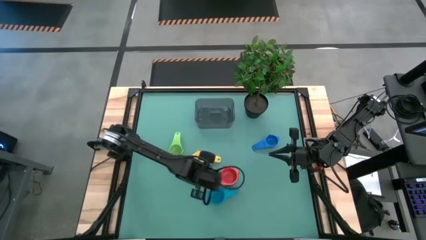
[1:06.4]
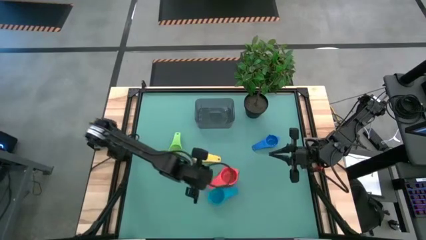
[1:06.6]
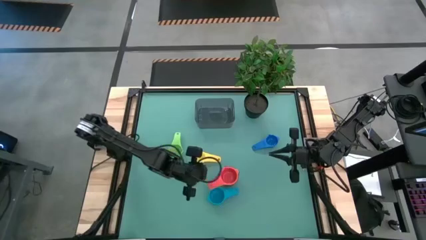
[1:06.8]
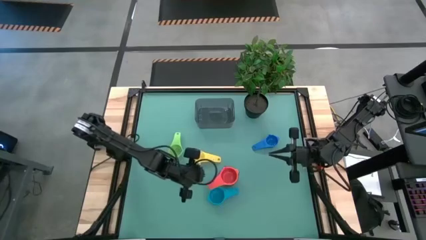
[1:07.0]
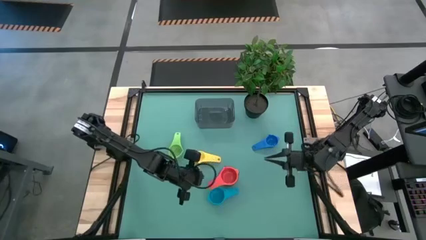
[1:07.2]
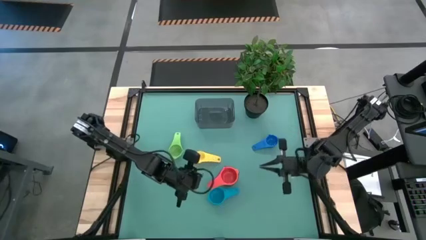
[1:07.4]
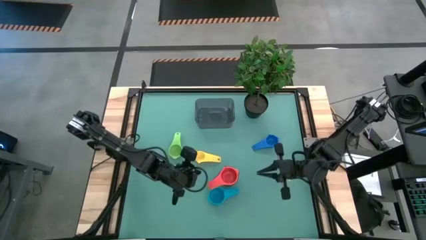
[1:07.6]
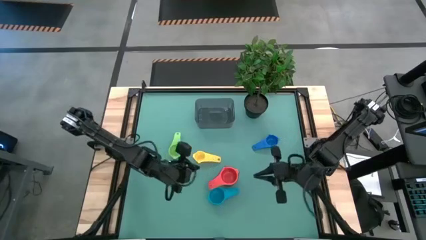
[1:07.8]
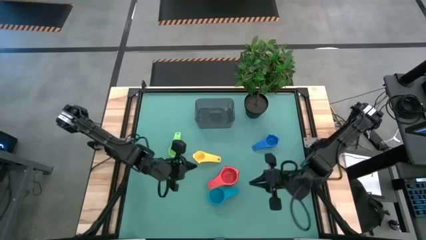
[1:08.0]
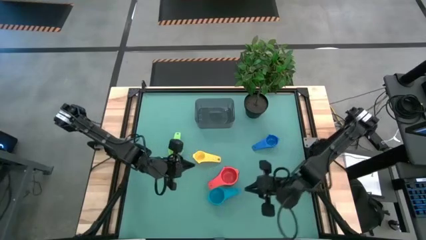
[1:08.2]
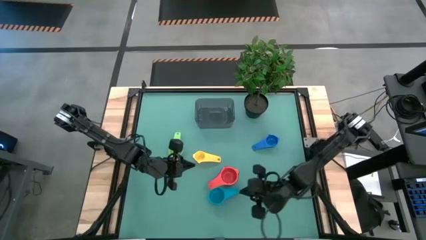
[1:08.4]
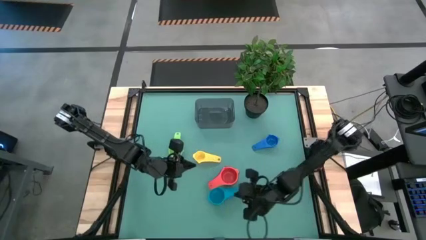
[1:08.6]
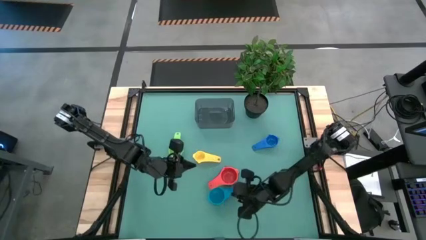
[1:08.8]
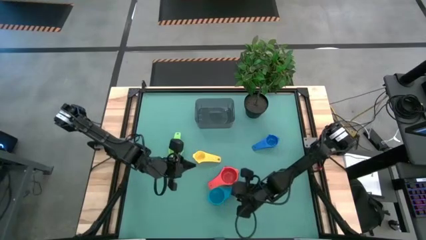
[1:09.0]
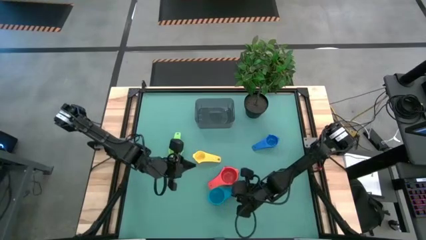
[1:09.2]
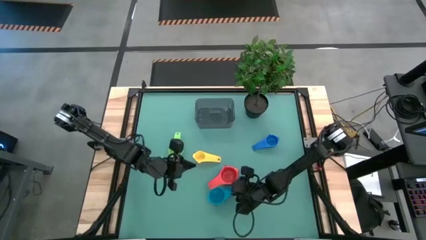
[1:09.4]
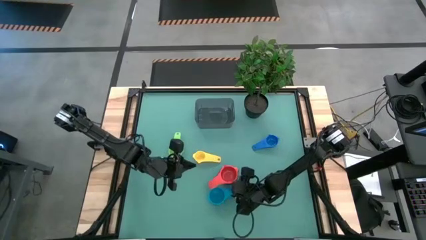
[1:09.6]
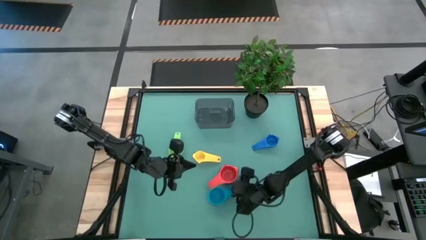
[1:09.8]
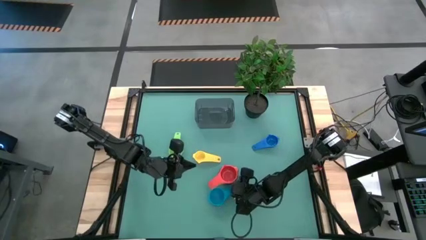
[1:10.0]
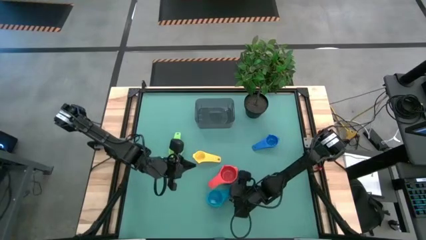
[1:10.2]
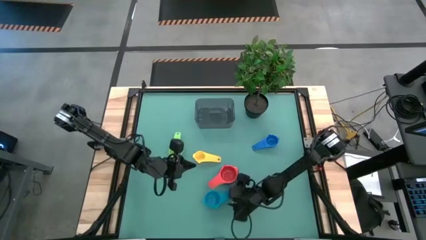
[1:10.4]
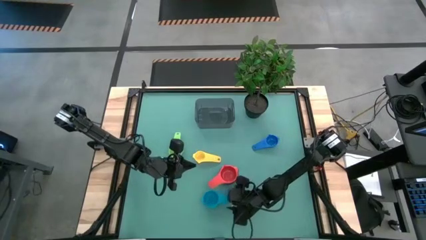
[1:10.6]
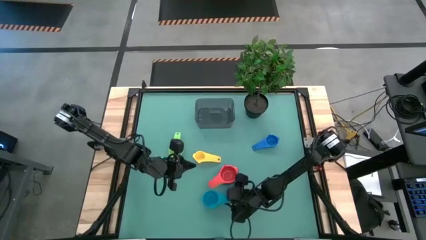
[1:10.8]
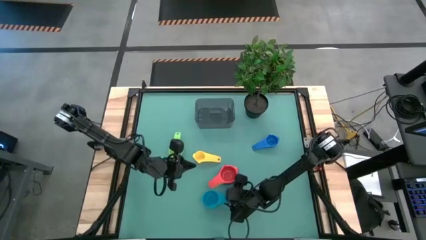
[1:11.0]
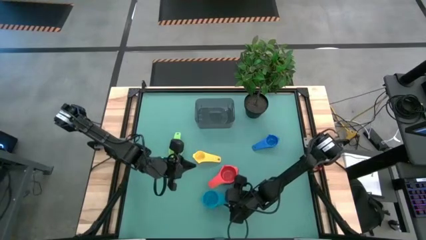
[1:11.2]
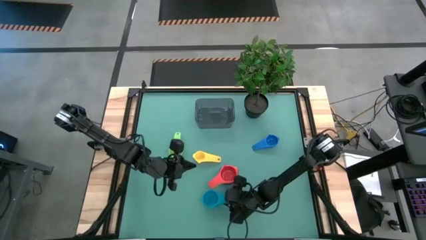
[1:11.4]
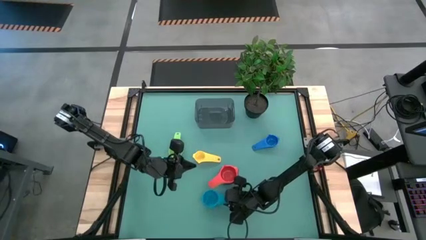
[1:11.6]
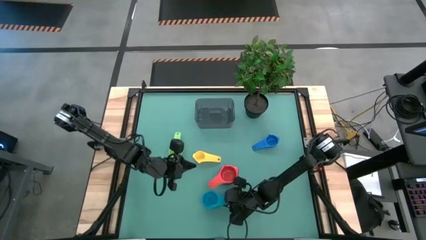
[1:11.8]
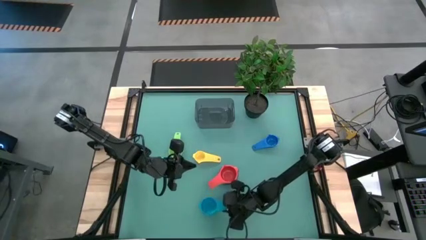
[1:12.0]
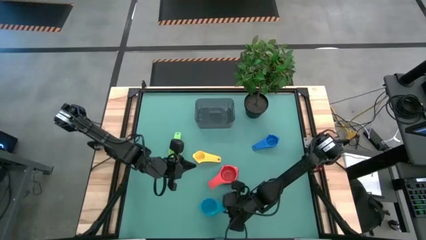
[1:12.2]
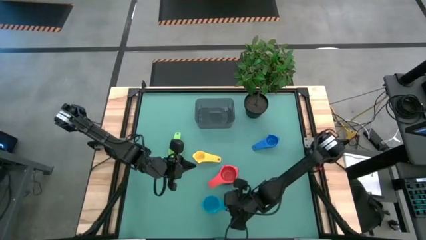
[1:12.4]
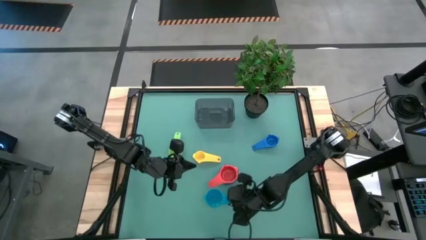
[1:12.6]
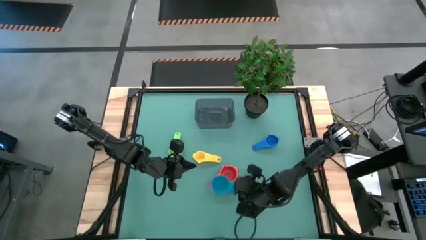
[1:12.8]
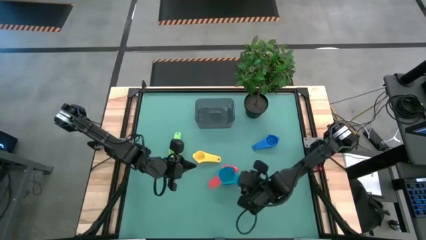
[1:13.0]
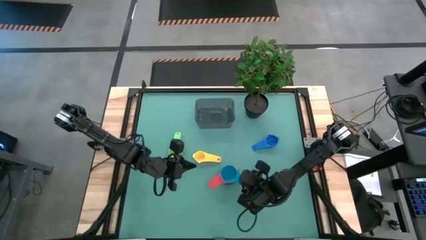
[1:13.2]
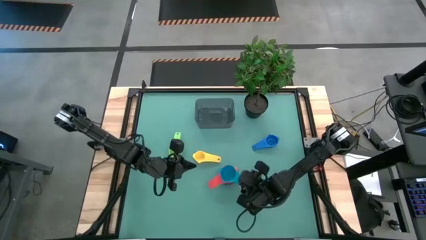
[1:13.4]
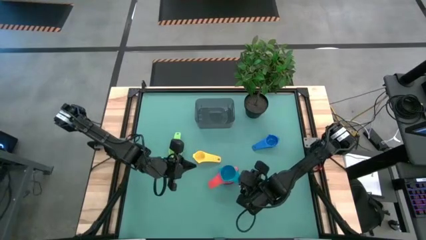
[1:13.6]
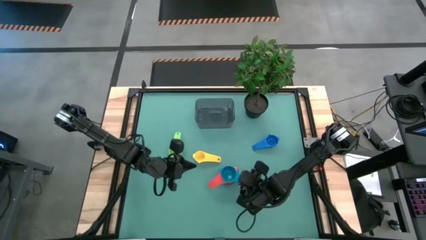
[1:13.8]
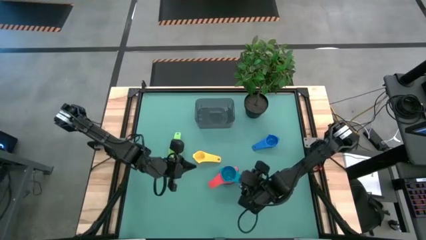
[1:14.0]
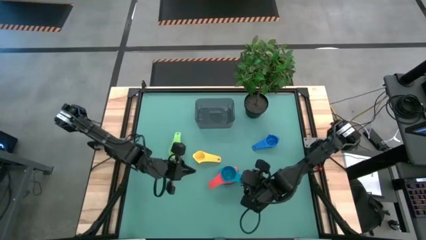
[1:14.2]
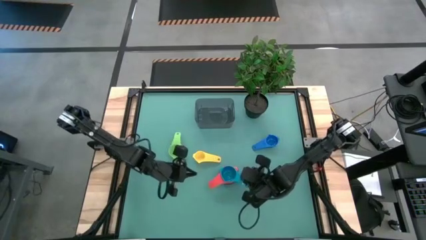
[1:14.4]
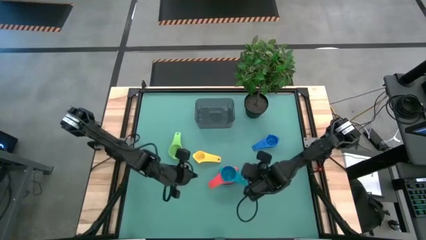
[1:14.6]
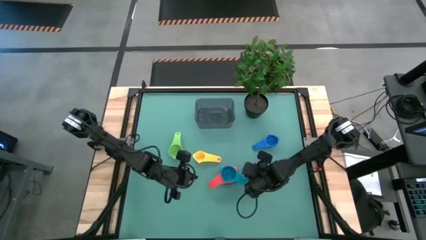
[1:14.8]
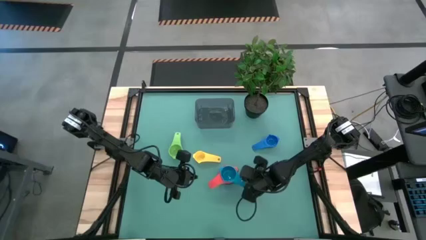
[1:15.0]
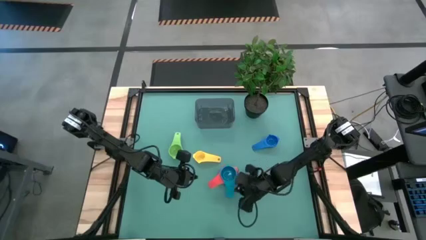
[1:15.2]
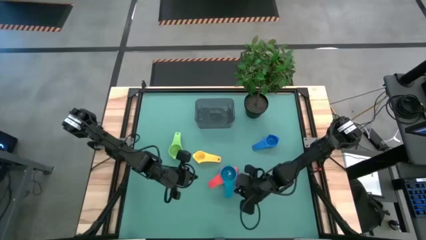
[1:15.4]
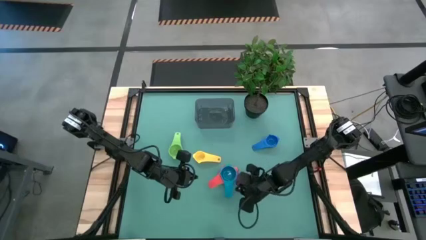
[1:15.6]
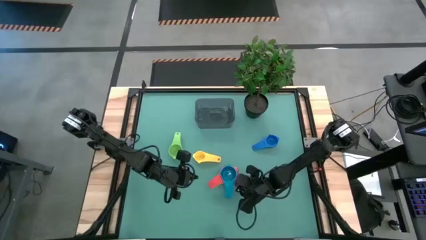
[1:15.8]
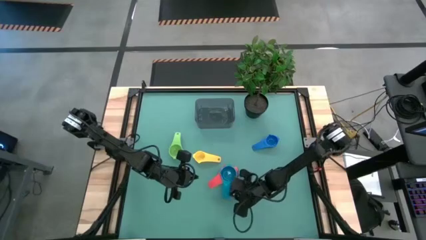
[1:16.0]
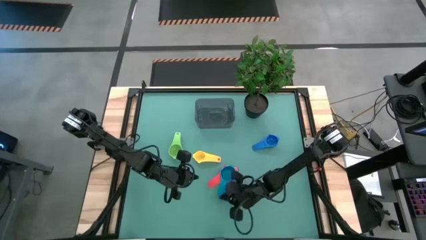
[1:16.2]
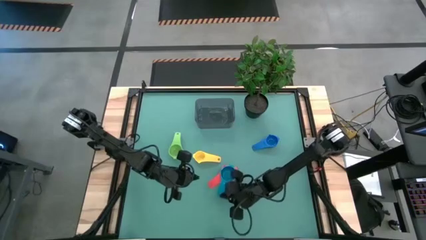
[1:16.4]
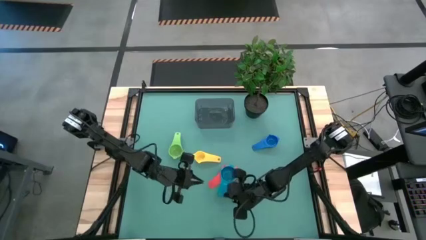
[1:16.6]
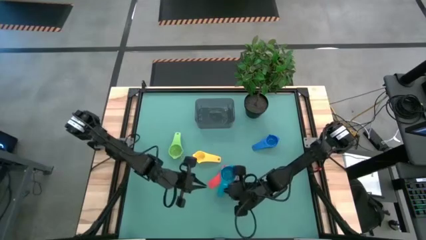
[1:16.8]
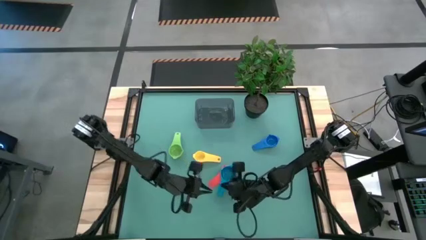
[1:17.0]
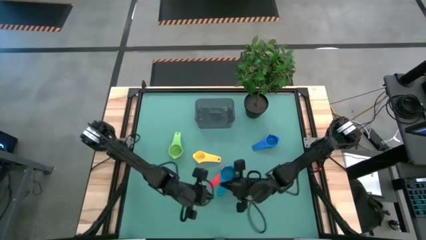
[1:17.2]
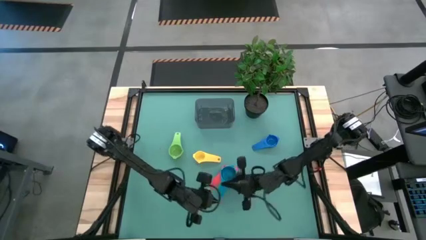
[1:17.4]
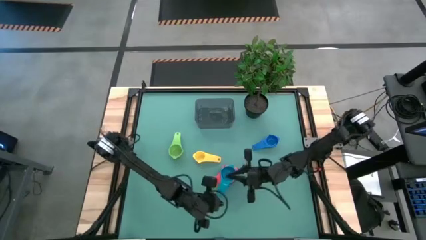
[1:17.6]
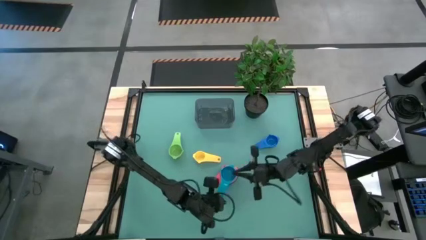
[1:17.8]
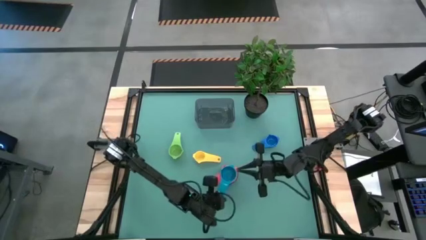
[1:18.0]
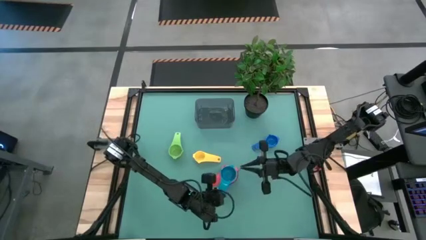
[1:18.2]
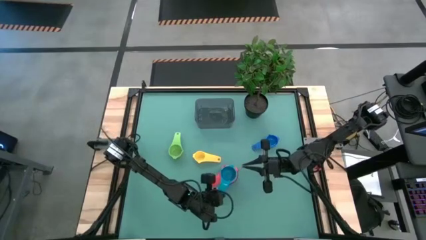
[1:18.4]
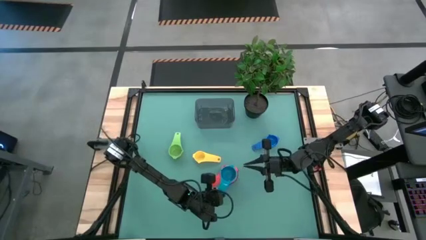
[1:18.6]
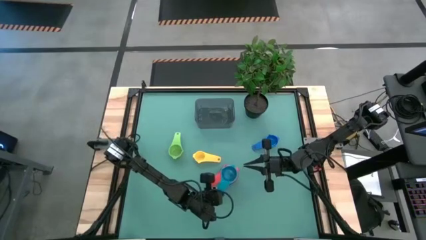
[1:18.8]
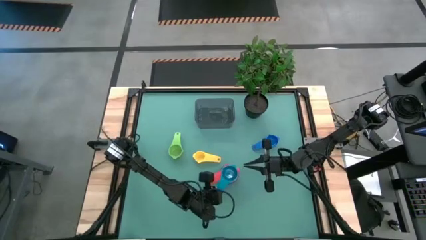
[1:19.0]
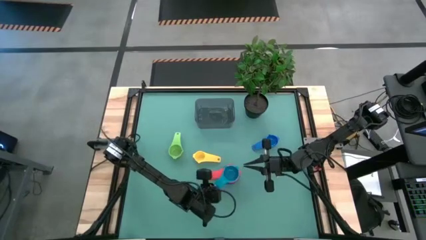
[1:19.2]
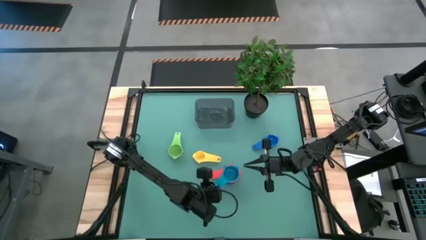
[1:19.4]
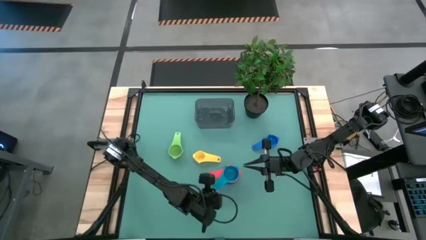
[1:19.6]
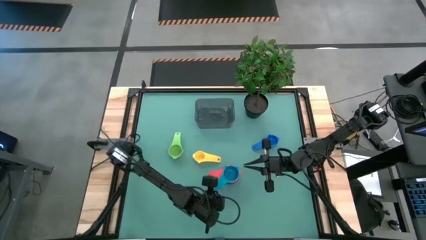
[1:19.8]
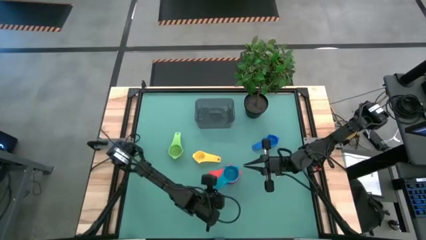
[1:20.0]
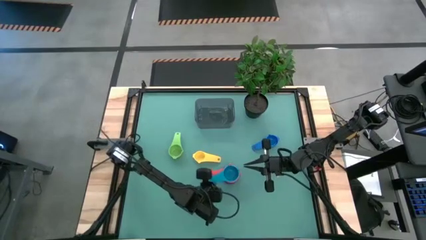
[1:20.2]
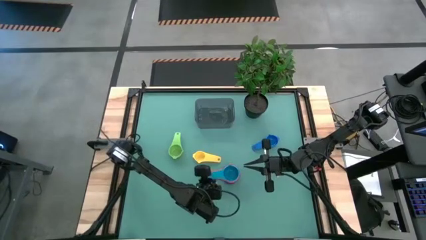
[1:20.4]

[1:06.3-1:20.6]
Task: Nest measuring cups in basket
Stack the light blue measuring cup into the red measuring cup

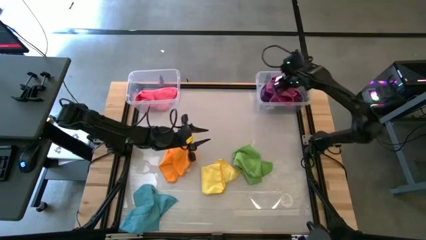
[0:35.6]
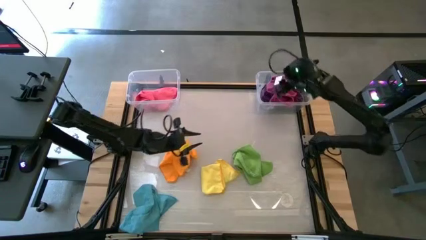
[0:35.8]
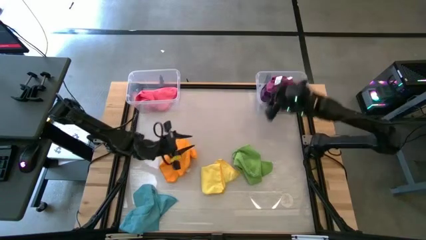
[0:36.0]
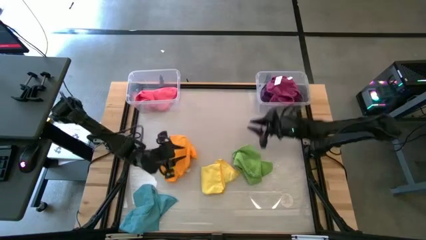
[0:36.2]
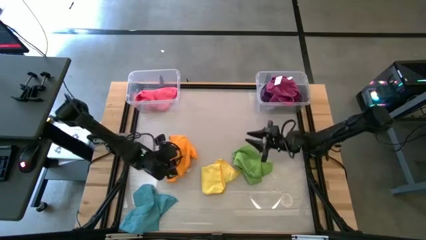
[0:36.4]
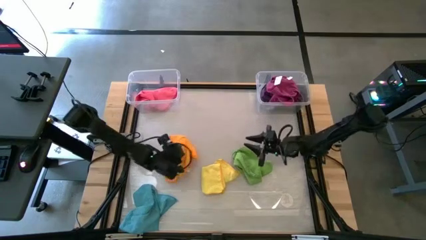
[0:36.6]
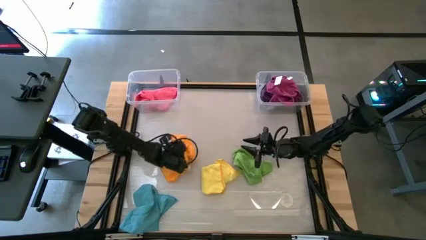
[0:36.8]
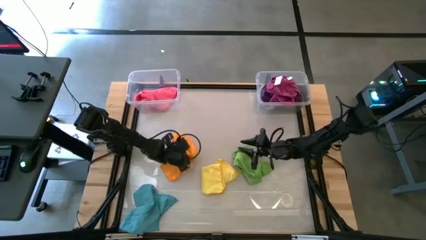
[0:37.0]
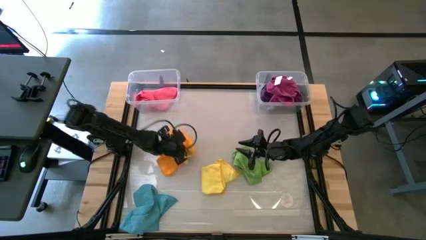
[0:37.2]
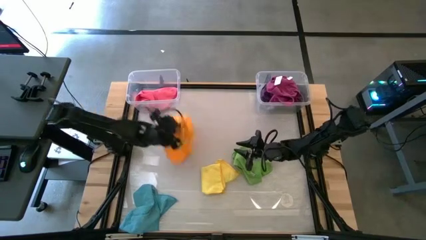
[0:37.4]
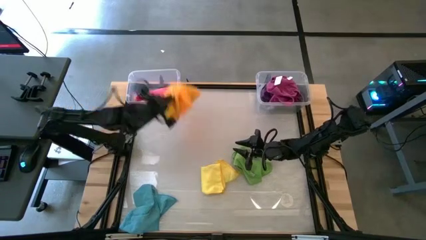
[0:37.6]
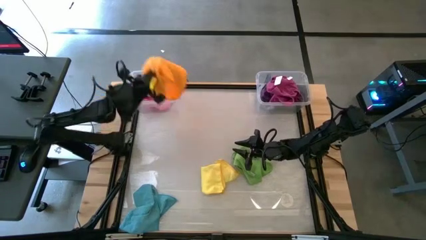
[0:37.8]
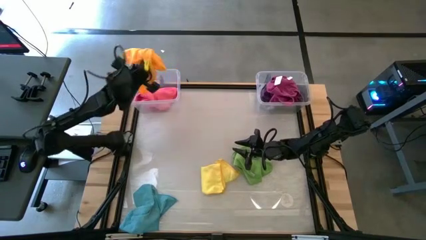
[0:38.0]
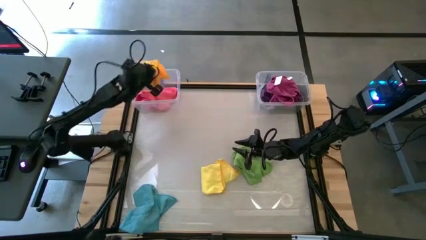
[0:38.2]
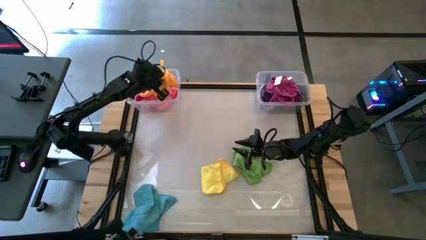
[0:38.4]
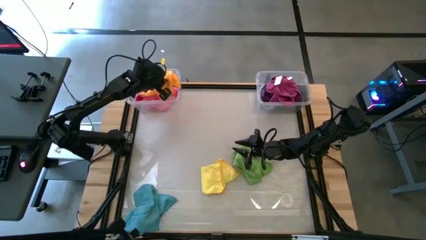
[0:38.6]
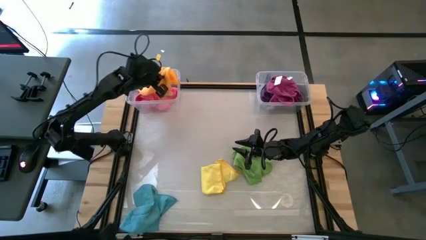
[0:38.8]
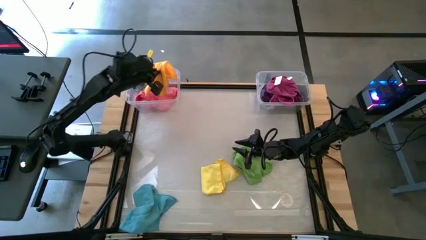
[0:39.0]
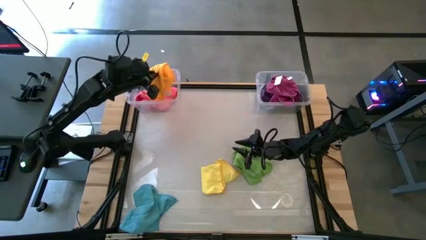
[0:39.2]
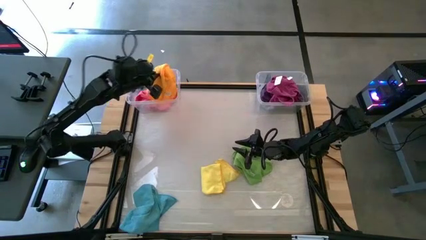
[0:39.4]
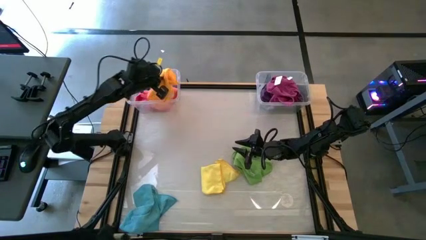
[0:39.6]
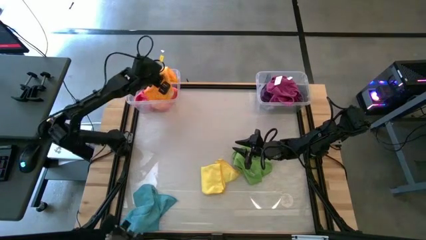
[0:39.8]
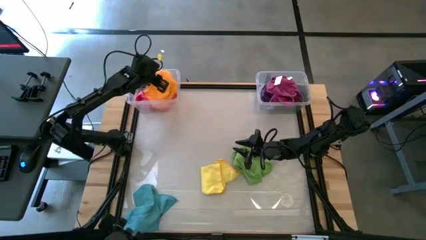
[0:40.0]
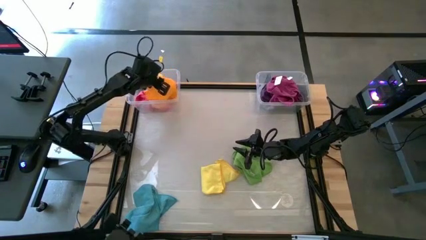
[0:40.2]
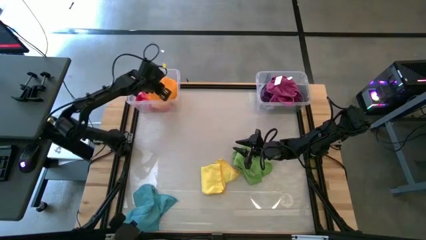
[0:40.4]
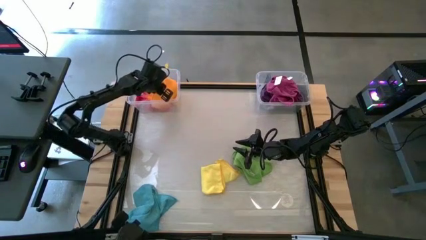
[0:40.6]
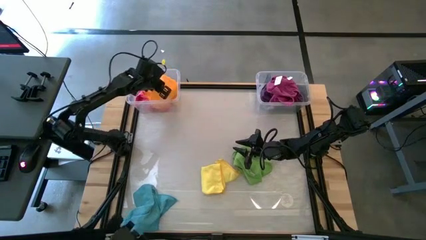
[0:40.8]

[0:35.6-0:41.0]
Task: Sort towels by color in basket
Put the orange microfiber towel into the left transparent bin
